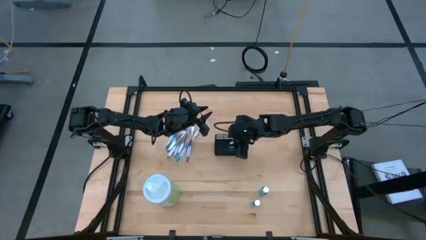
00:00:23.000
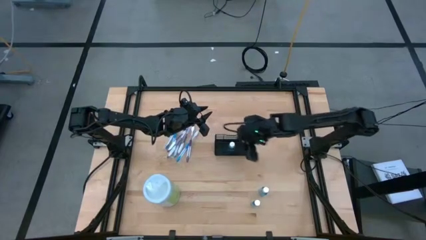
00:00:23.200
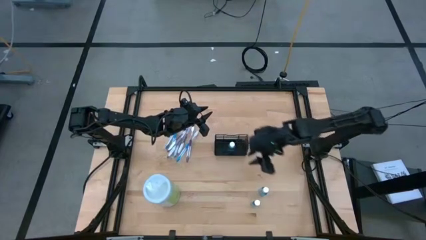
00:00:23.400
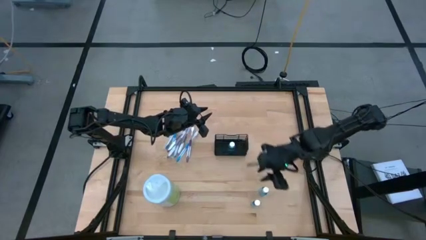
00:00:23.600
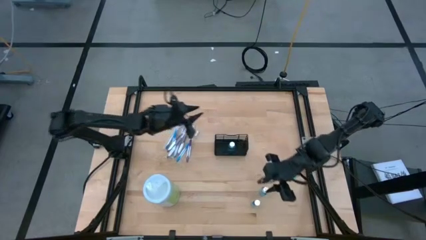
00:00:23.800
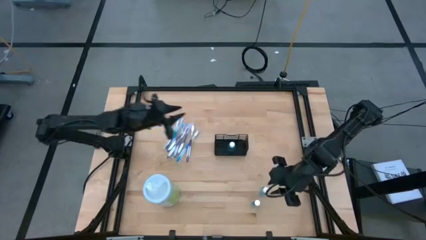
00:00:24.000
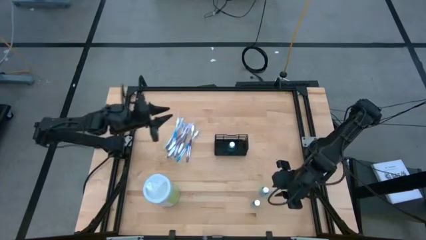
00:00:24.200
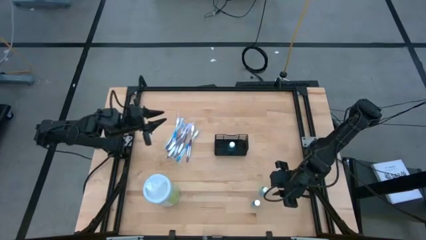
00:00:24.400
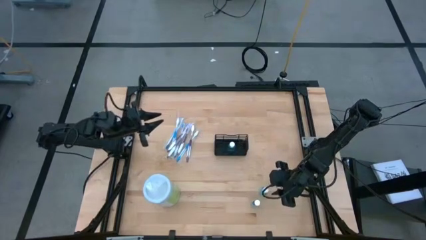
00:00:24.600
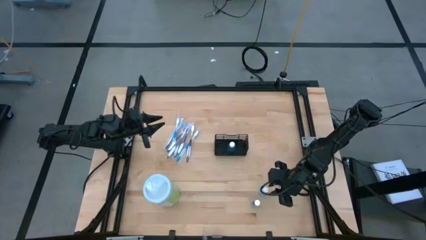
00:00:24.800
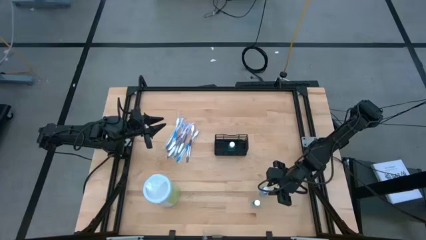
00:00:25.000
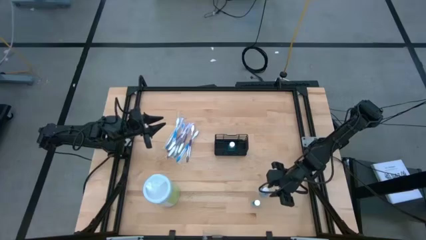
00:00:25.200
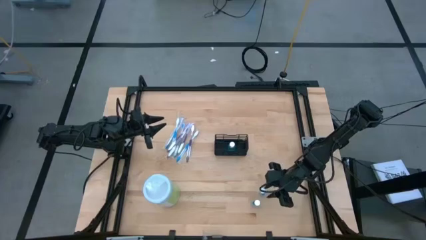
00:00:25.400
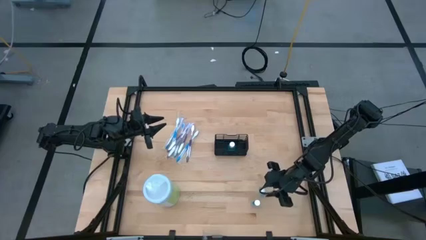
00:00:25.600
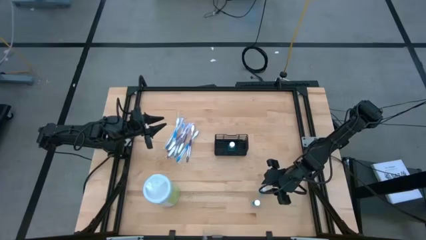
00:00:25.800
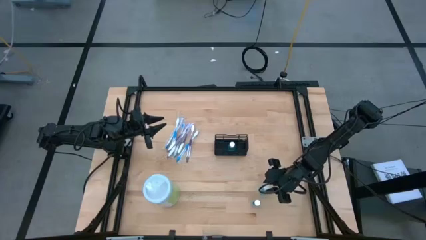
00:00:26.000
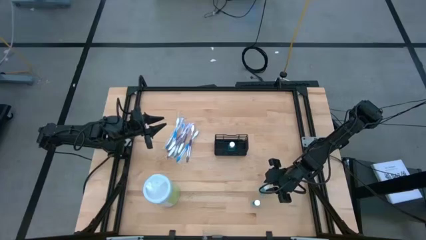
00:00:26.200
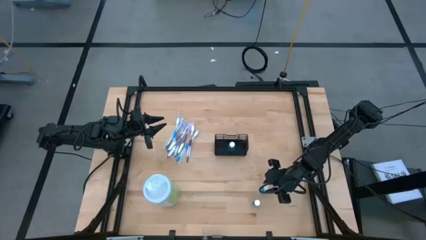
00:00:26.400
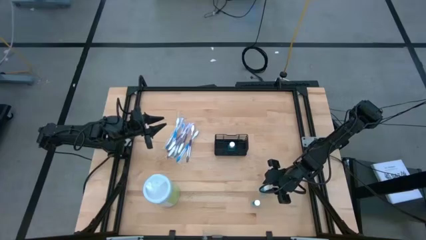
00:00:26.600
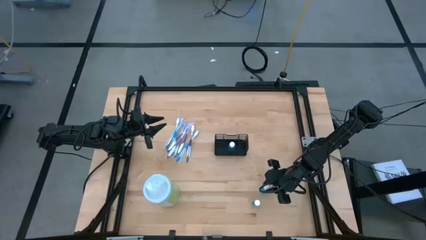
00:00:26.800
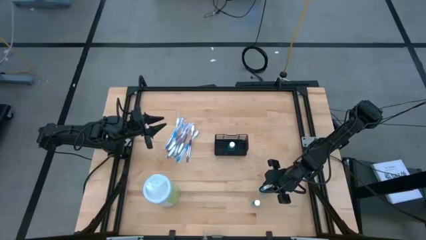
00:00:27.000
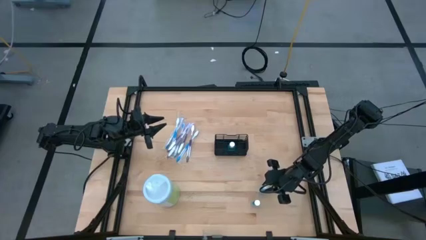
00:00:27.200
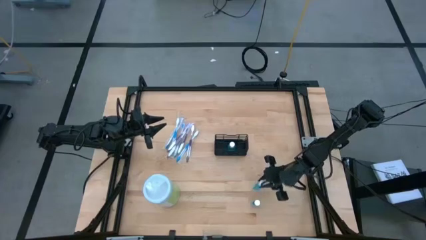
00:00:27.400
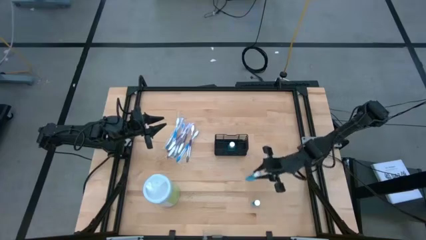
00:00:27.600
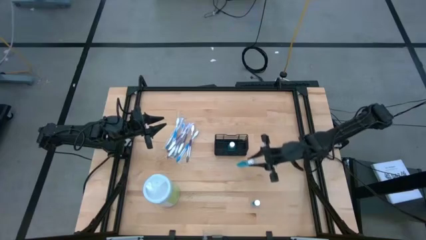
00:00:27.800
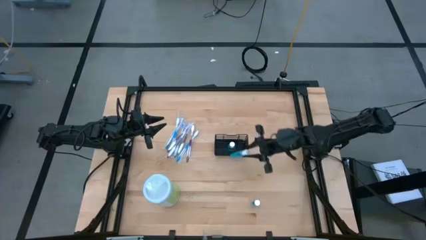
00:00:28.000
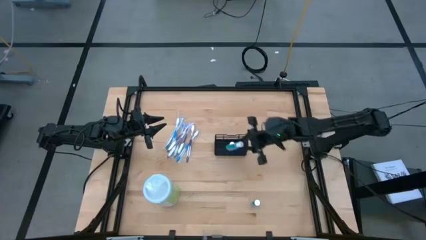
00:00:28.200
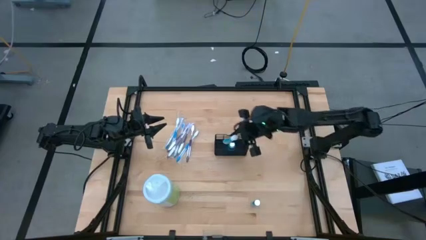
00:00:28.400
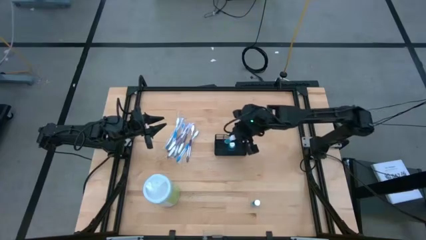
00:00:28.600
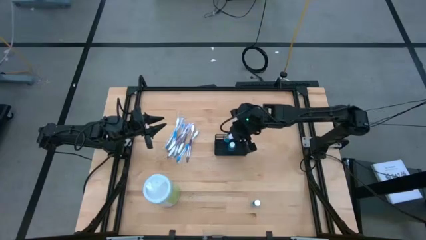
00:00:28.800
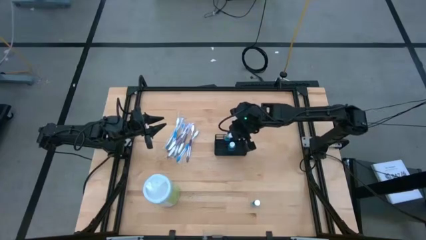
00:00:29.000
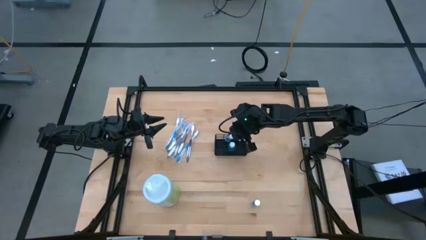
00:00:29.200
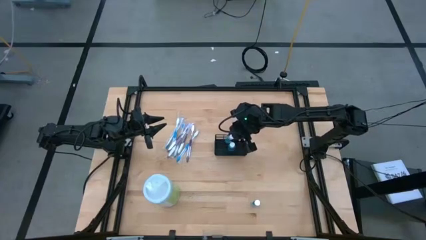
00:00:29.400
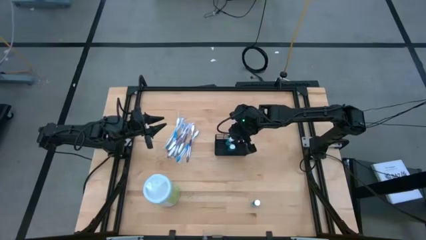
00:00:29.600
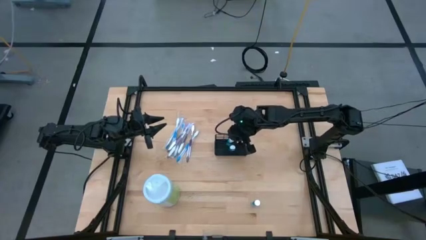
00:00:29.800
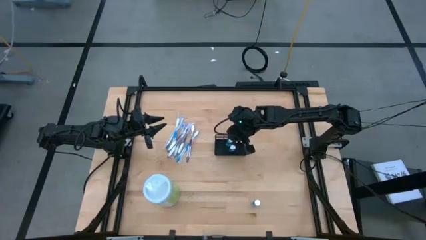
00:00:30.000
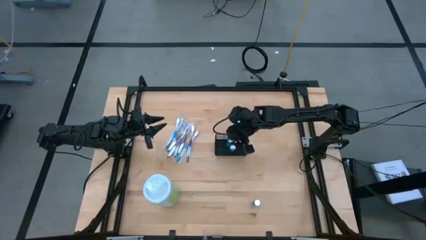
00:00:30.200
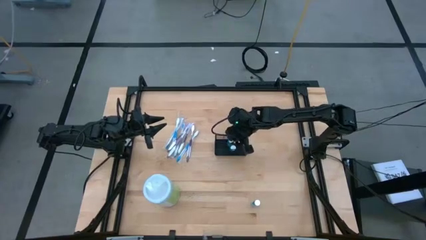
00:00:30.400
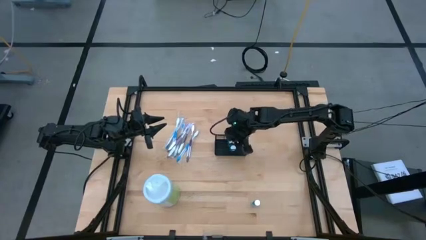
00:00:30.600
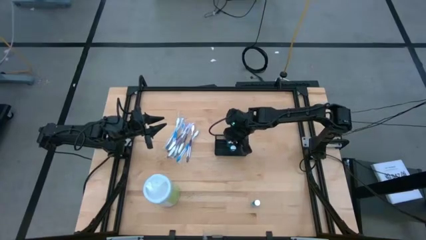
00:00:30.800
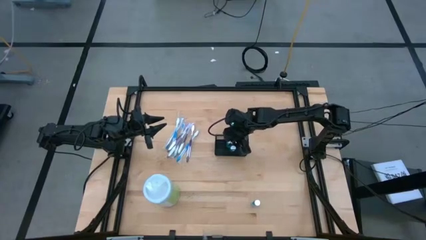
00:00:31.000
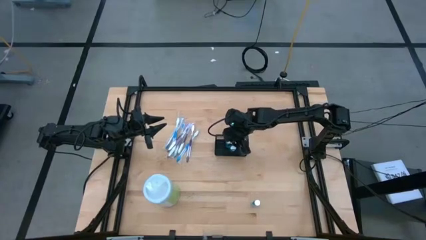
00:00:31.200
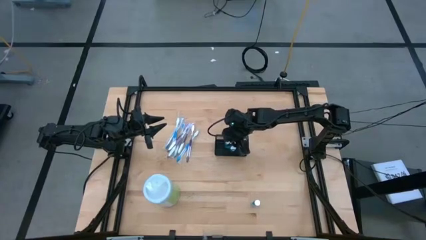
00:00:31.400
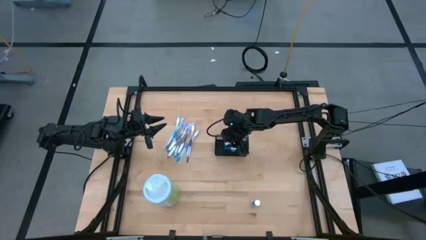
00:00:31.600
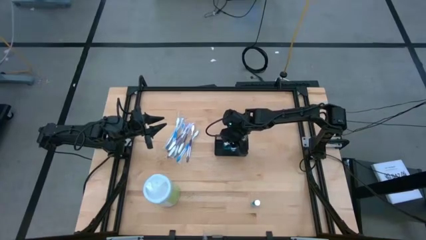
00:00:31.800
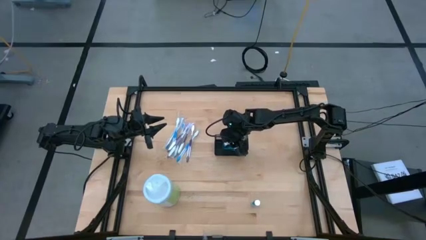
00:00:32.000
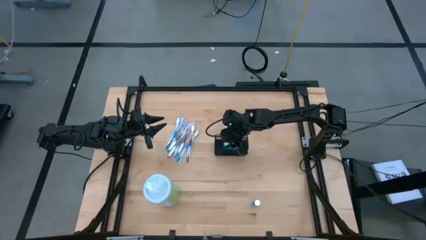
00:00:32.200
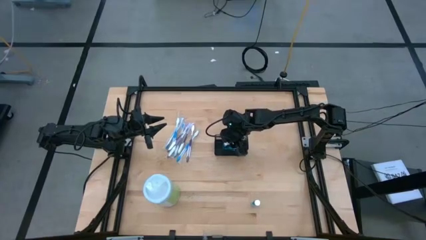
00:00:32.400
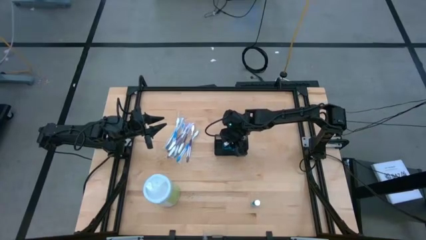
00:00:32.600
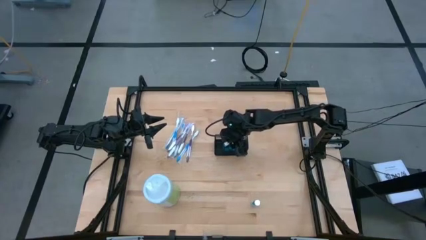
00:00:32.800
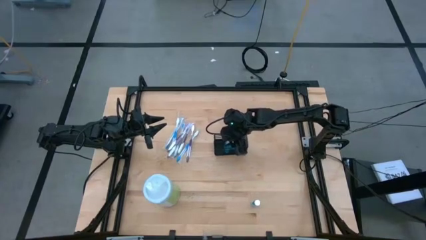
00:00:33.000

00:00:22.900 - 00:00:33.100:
Task: Pick & Place toothbrushing station
Put the blue mouthwash into the black mesh organizer

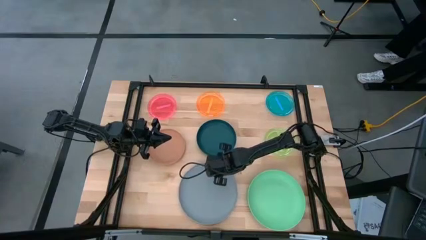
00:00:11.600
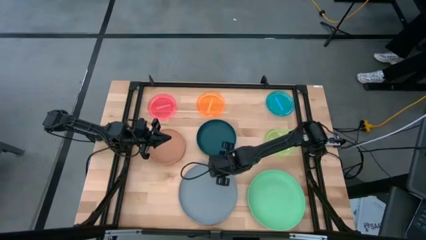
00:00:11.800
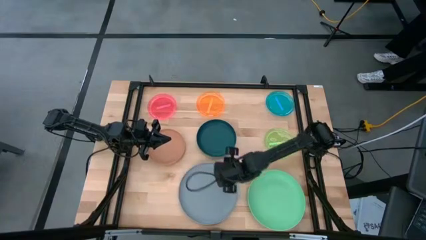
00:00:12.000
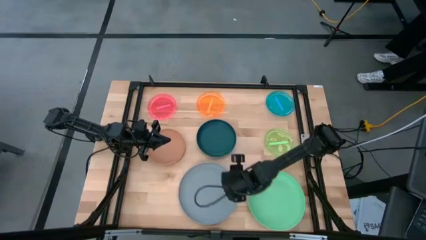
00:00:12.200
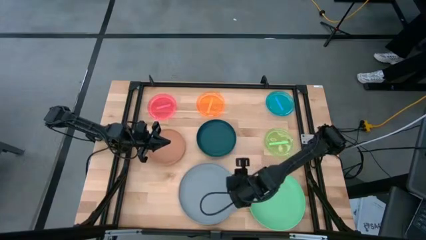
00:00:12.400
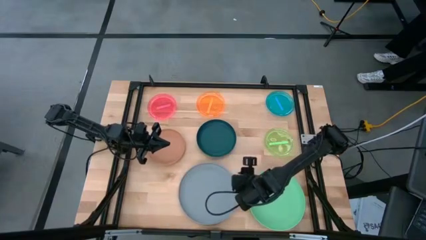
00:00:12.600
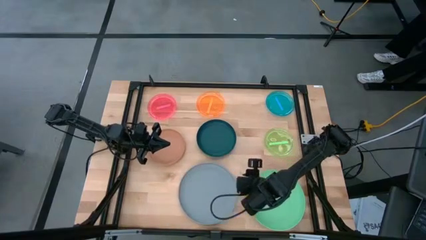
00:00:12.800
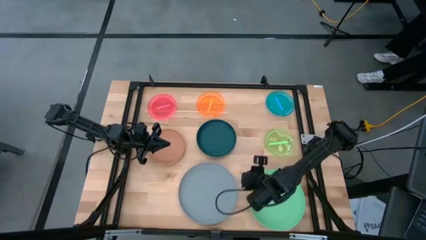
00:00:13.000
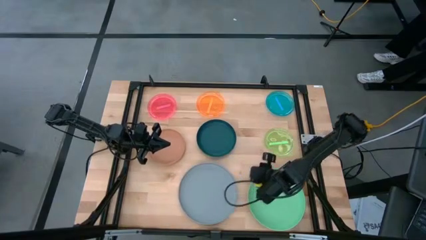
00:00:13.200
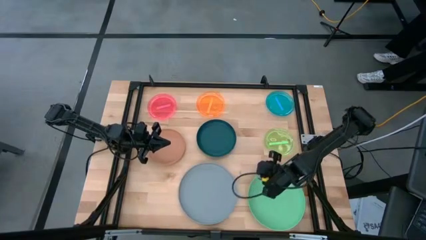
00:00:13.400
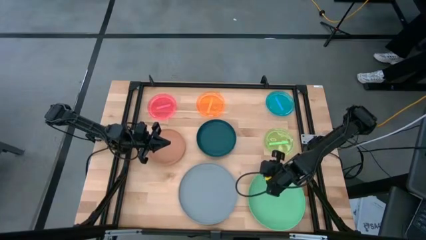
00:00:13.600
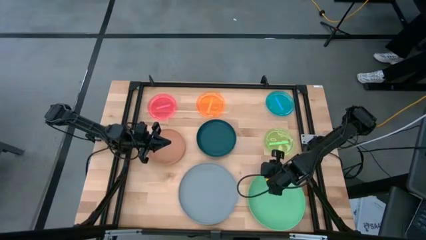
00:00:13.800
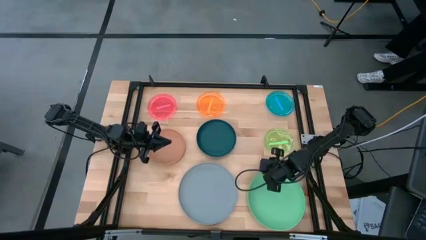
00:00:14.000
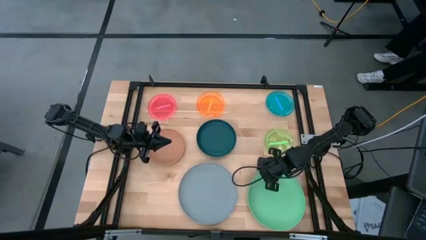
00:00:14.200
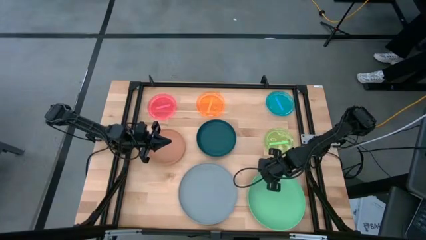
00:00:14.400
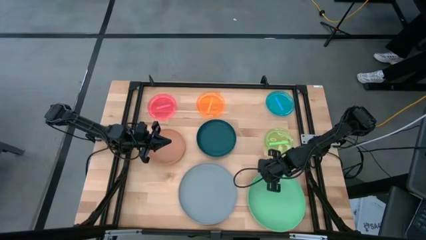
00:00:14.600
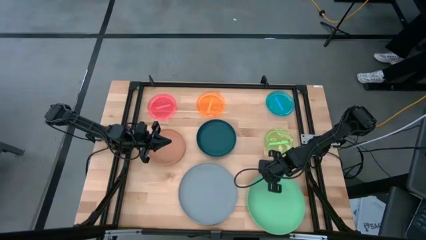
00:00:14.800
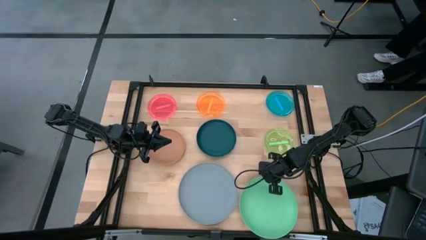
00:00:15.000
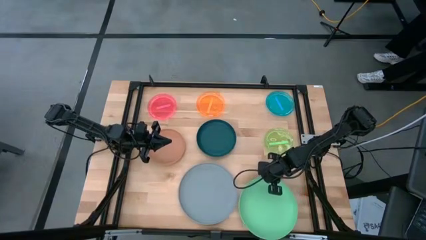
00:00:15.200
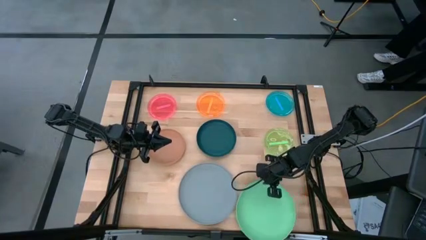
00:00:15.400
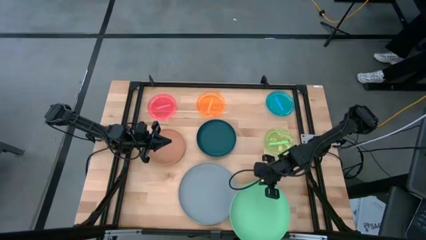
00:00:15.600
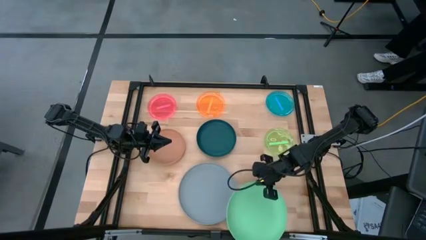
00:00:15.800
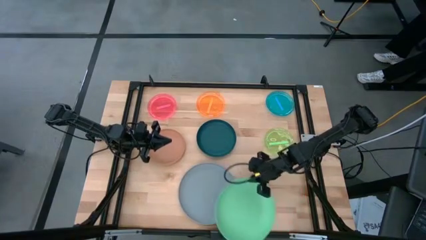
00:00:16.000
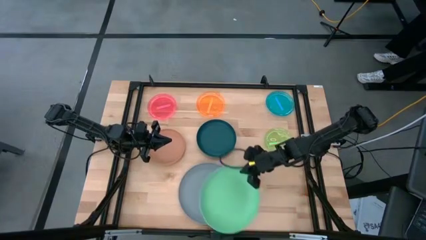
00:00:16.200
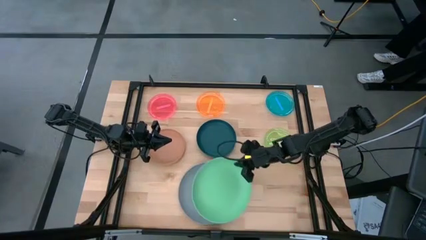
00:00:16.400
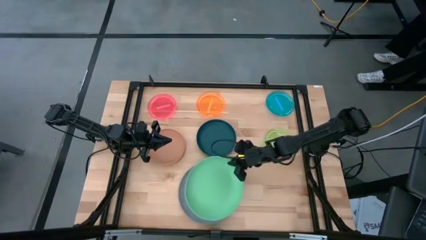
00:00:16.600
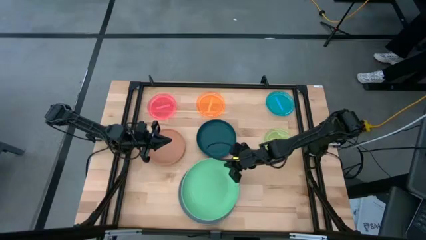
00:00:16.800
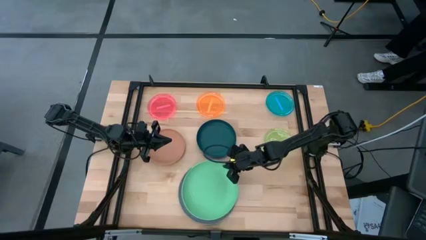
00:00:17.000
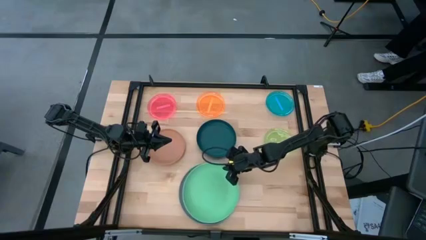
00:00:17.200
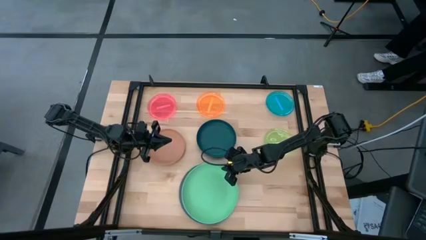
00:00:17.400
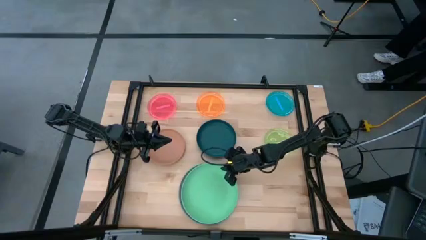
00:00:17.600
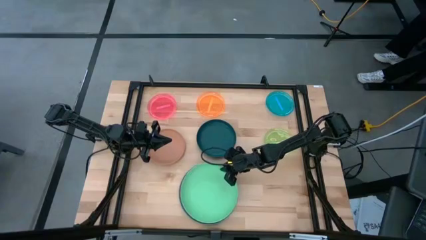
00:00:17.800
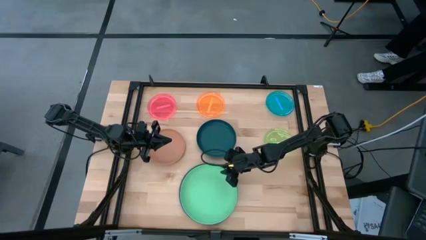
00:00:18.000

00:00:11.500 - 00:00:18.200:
Task: Stack plastic plates
Stack the light green plate on top of the gray plate
